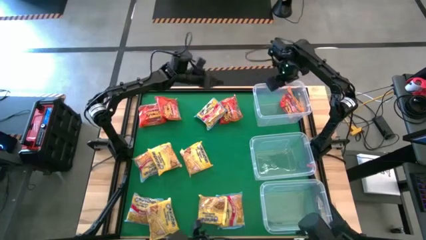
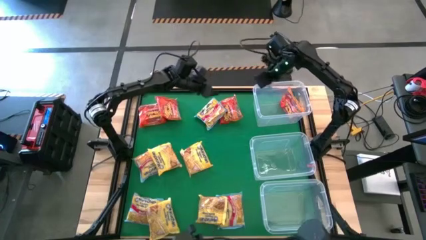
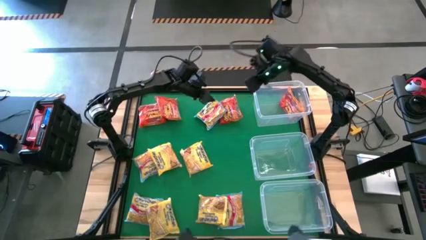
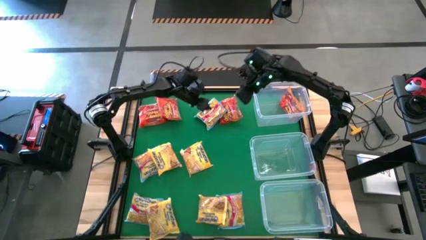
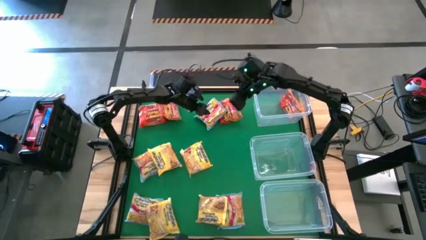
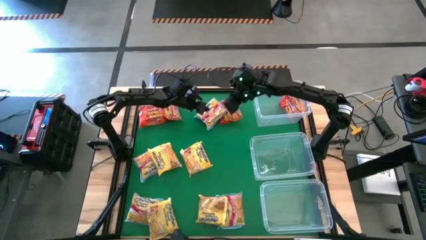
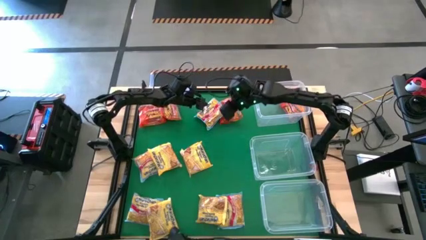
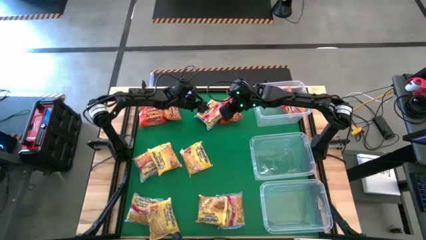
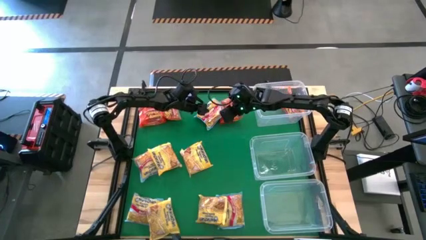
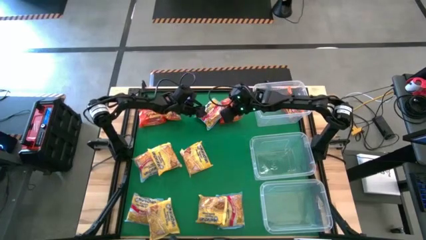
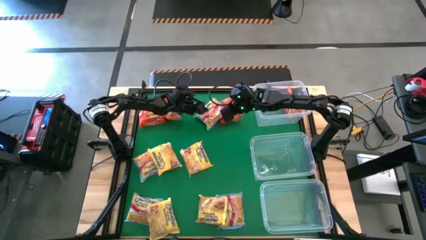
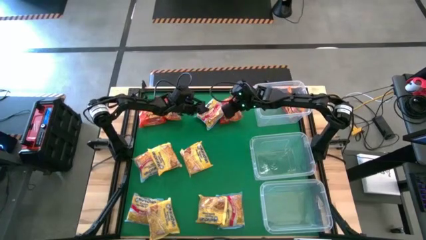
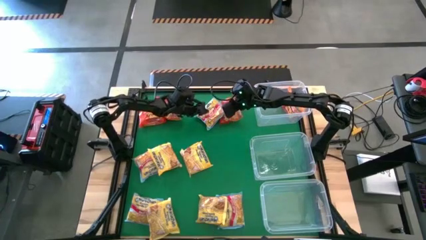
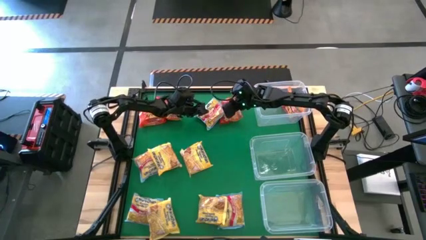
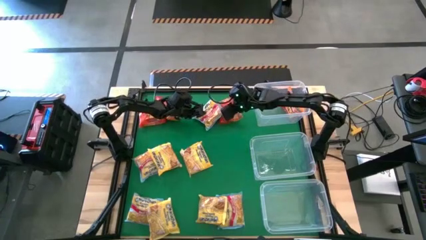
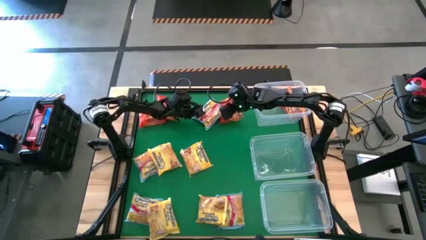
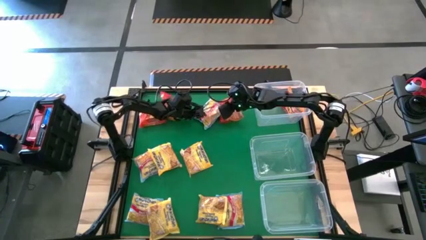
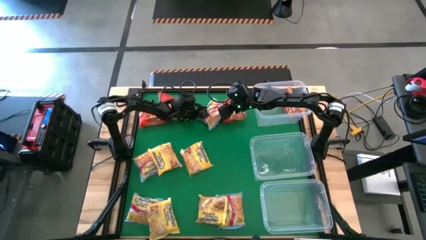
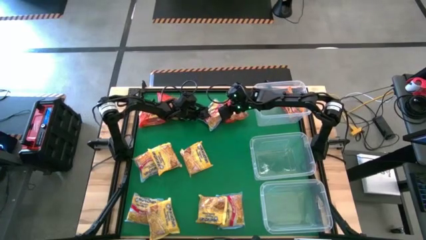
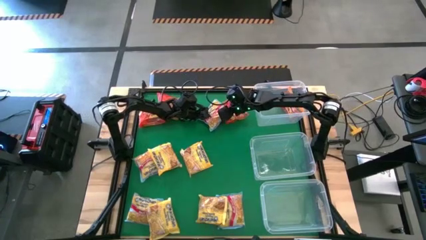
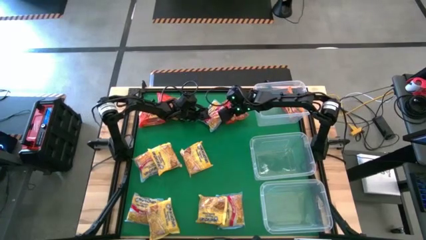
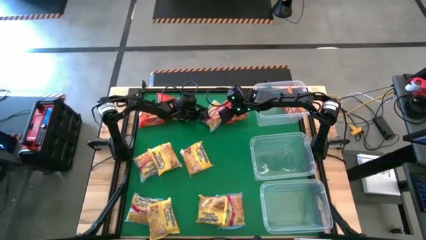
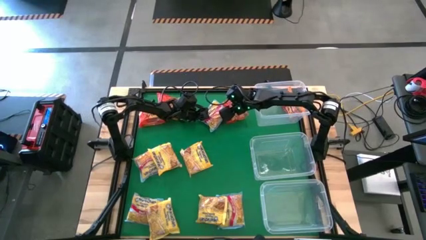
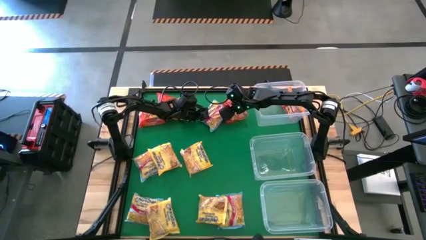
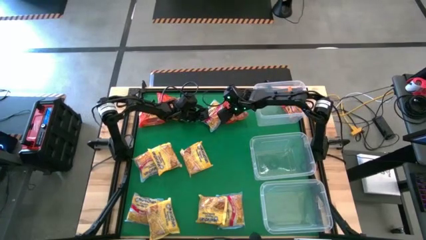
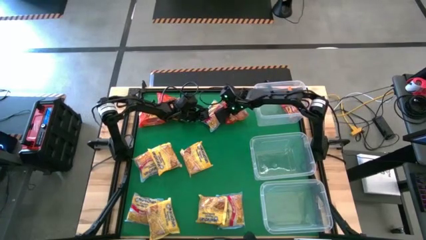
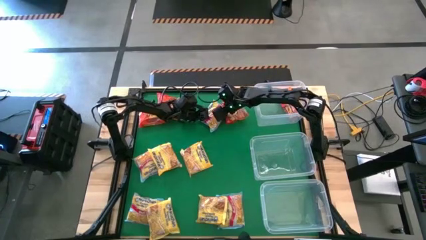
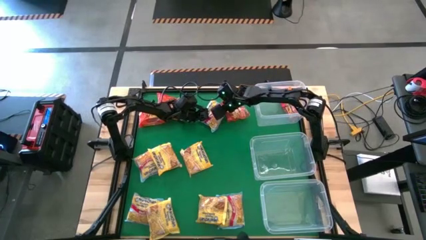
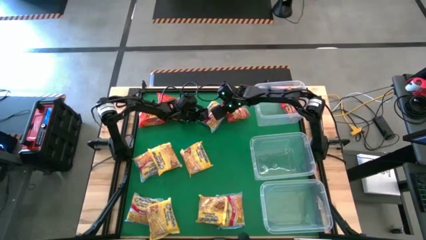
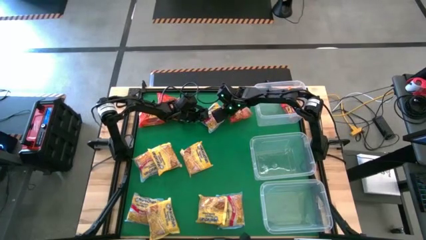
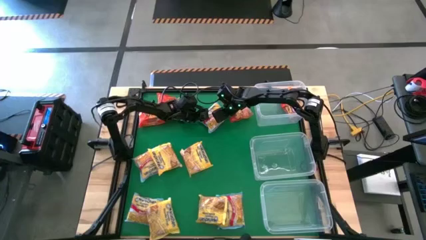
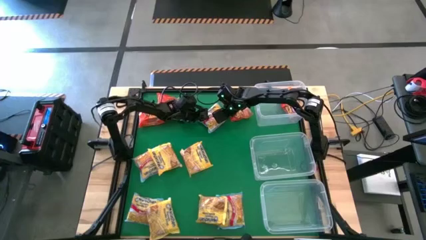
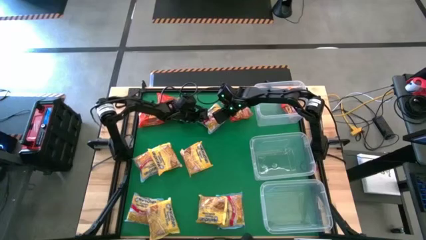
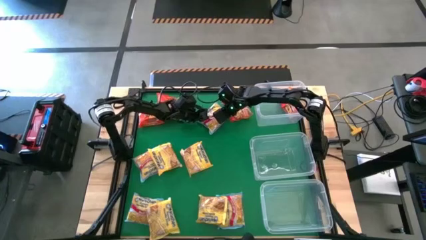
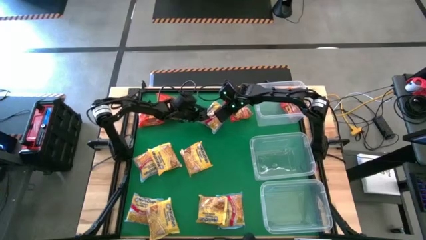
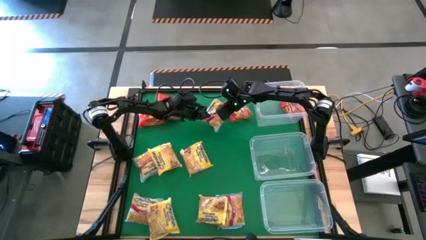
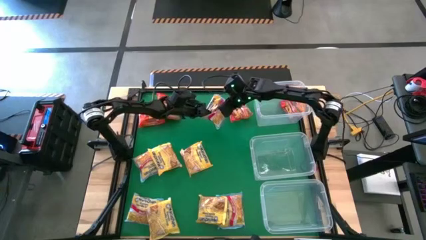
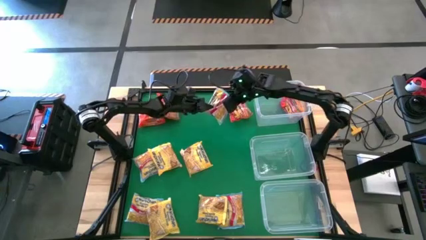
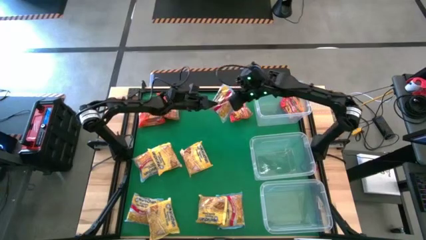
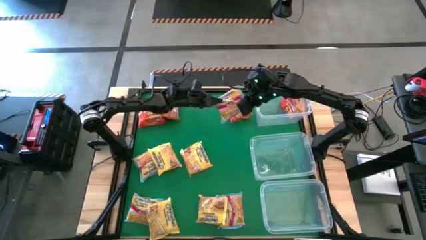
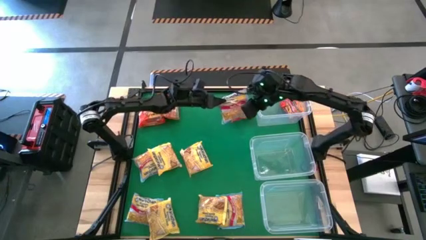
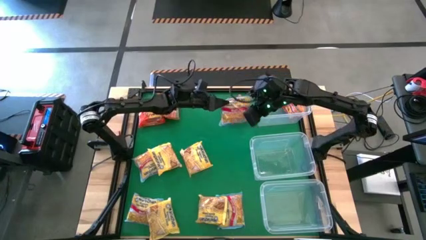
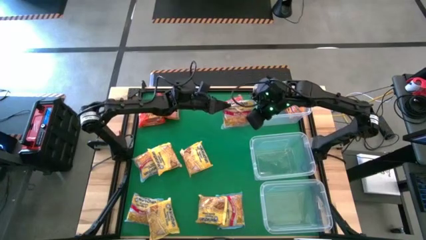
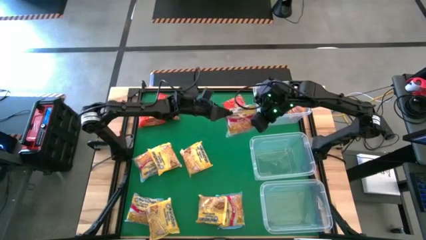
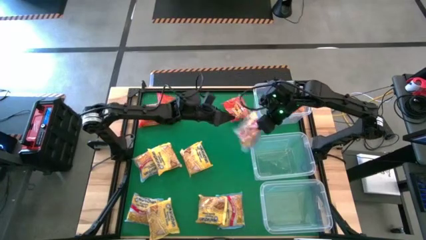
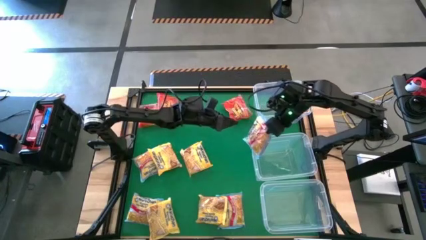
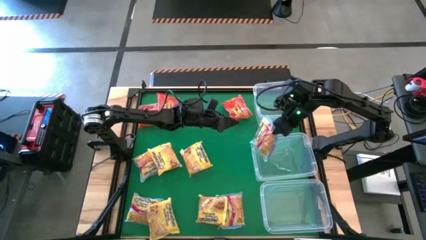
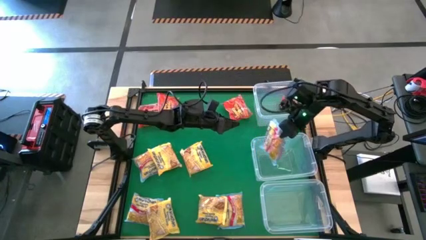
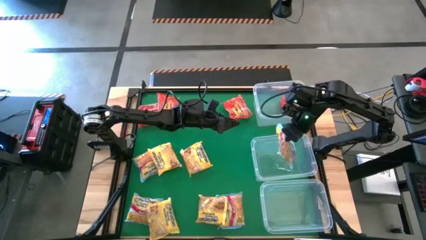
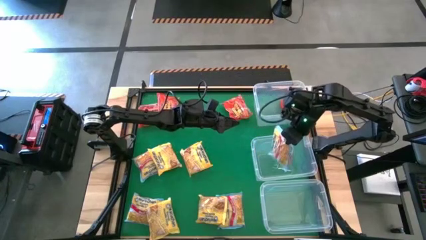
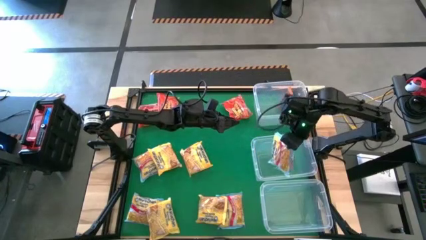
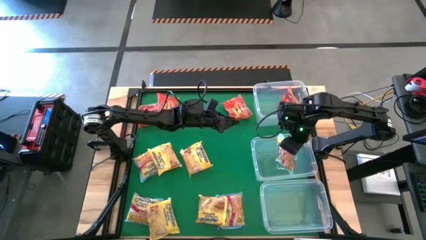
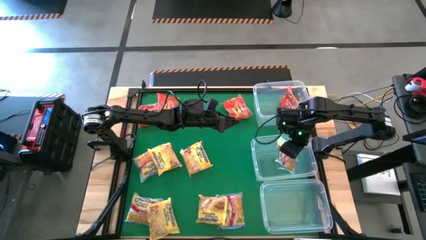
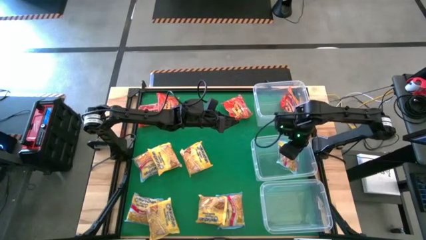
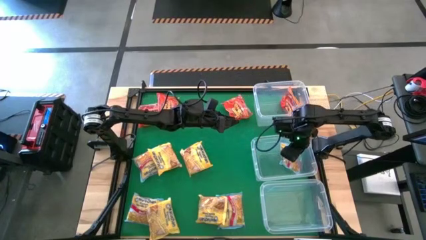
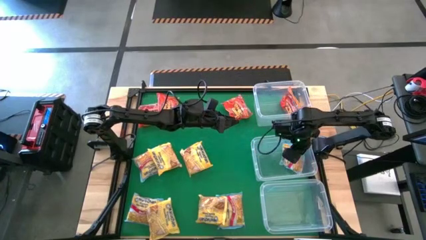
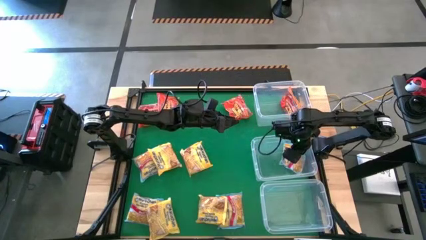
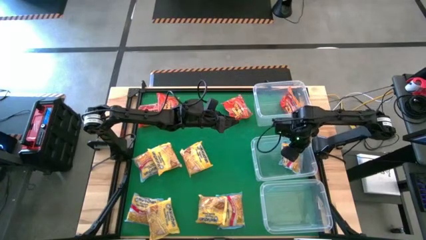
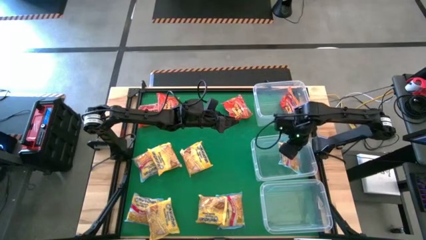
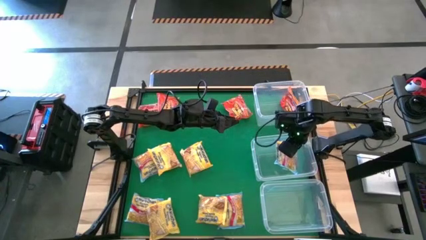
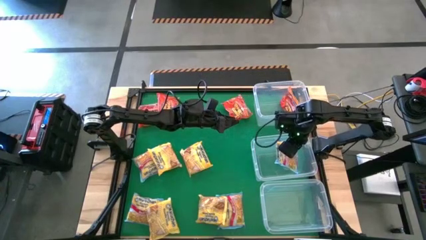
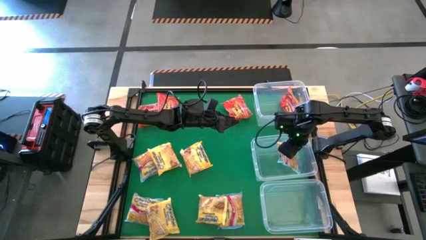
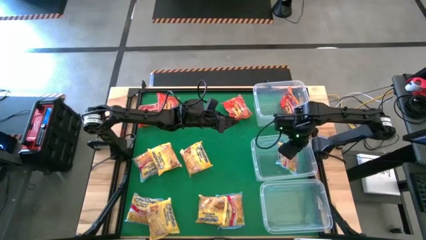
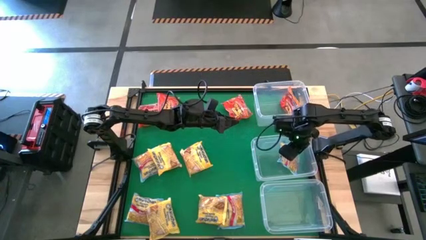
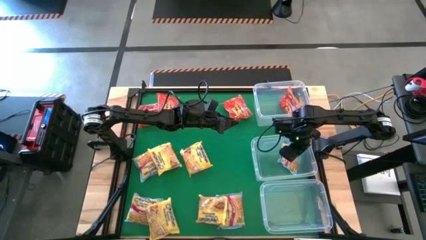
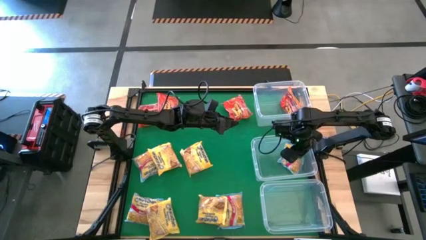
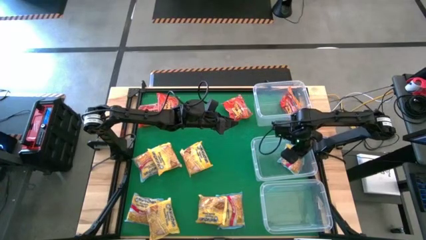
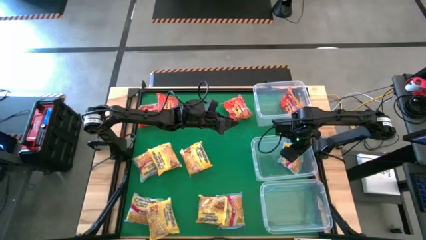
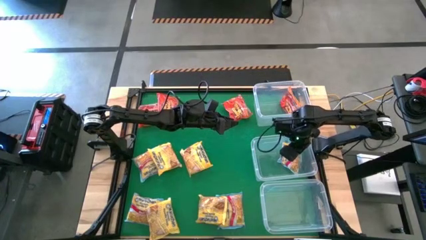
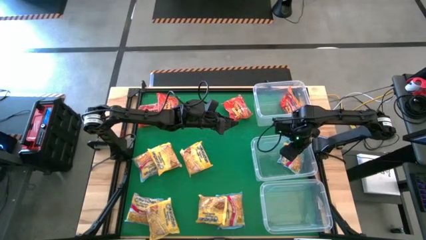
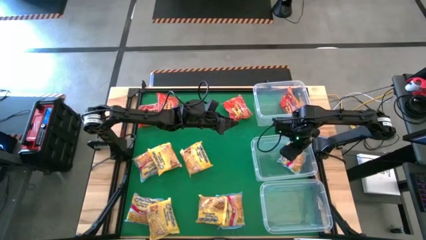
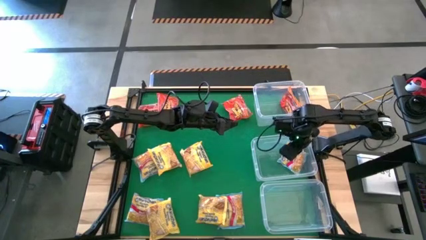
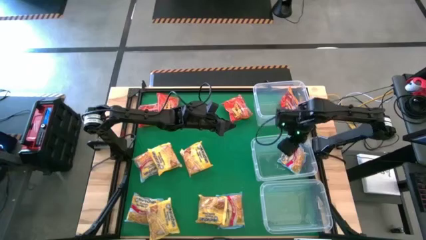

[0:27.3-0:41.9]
Task: Sort Maruchan noodles
Put the top blue noodle pack into the middle transparent bin
